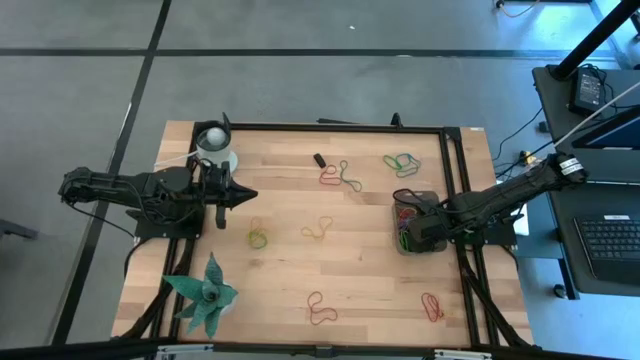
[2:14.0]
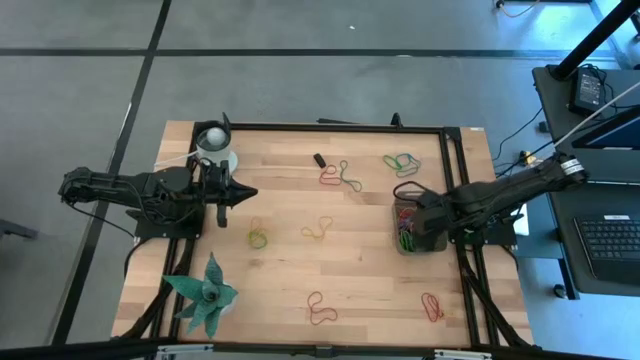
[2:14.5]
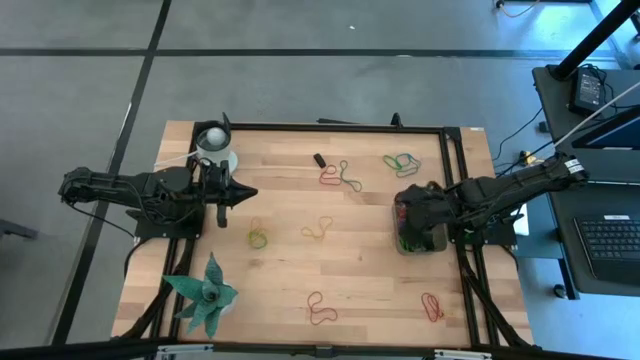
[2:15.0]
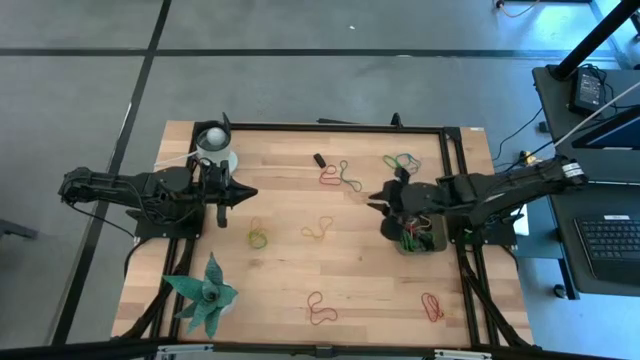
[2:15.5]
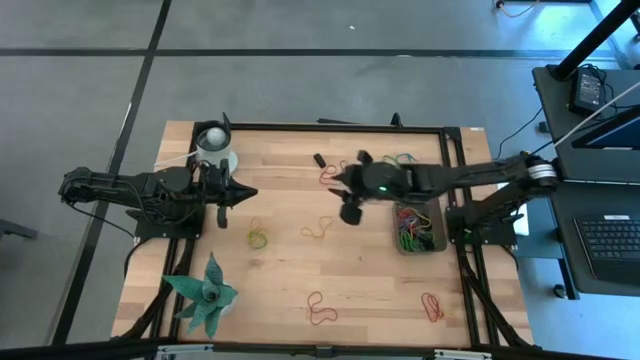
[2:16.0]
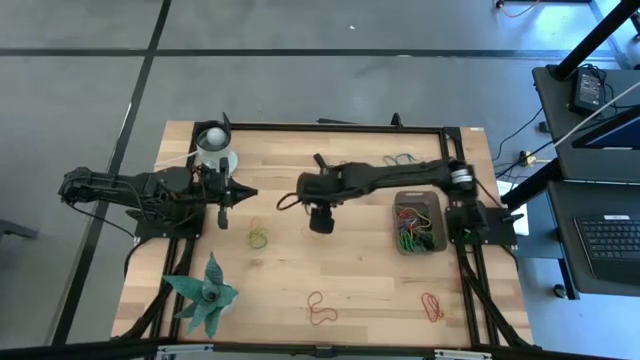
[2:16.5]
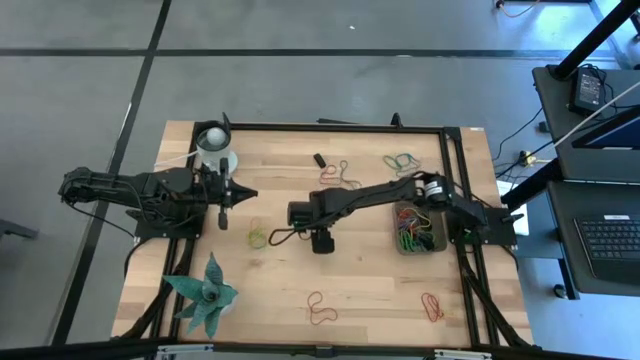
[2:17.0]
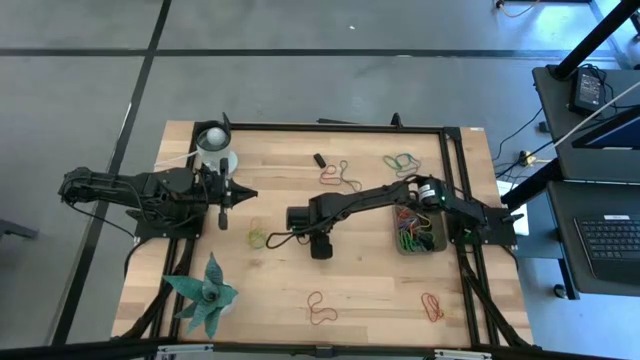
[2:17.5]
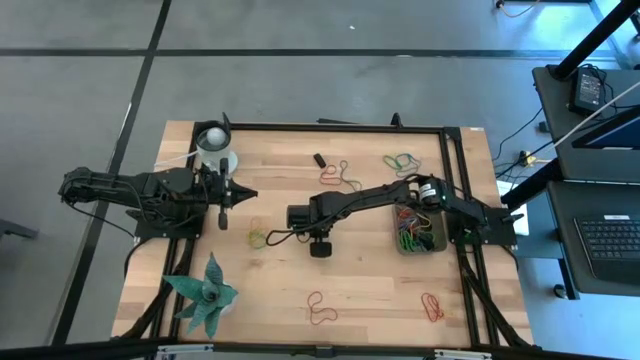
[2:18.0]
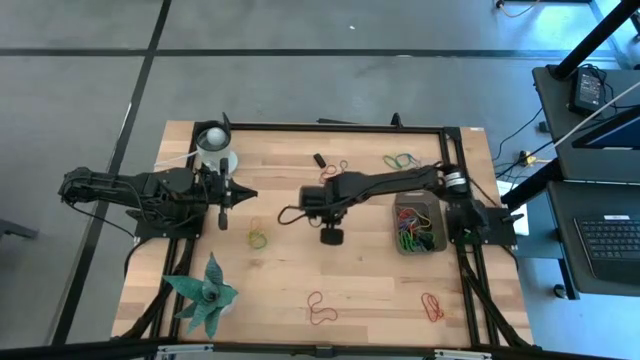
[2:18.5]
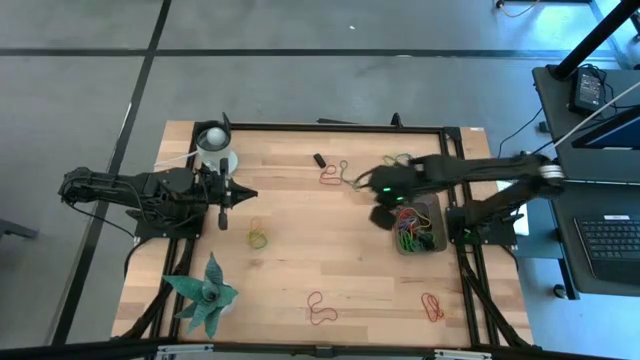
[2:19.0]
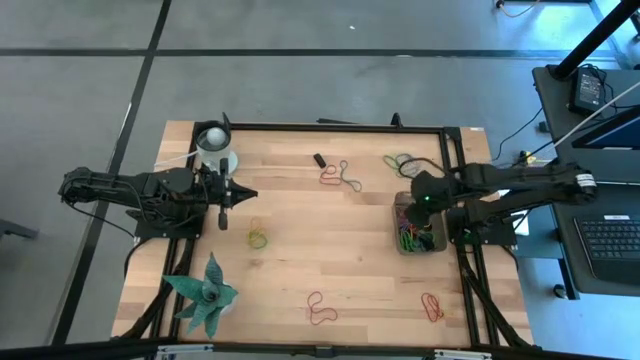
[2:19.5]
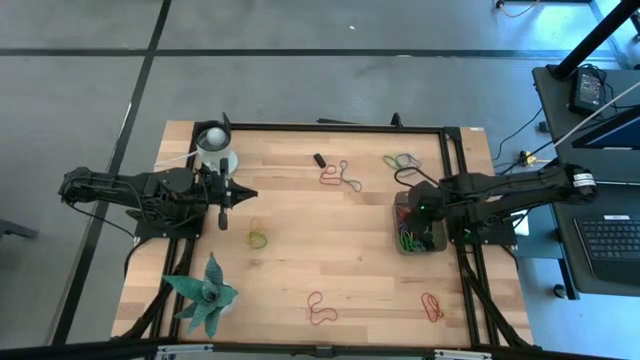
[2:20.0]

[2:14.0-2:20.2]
Task: Pick and place rubber bands into bin
Put the yellow rubber band into the black bin

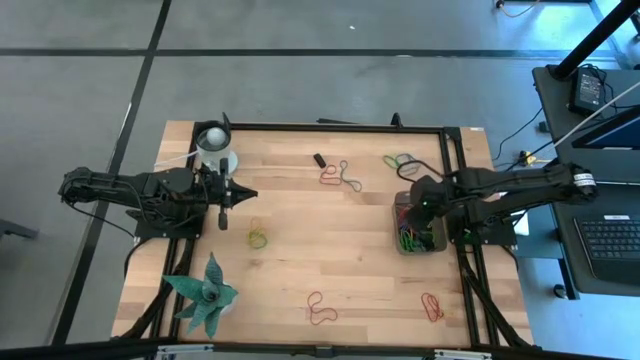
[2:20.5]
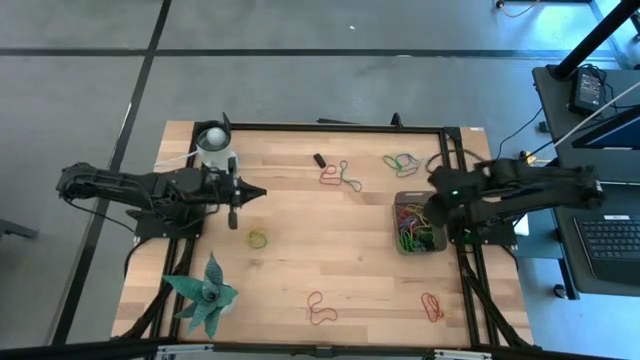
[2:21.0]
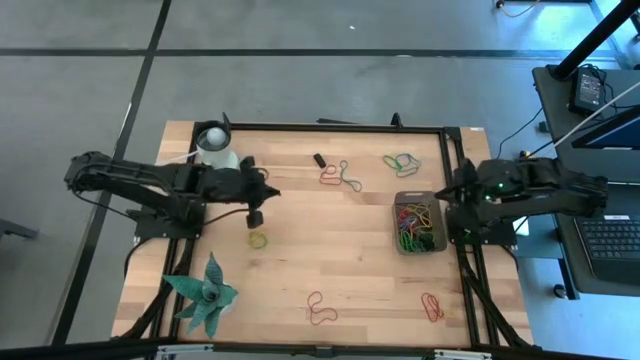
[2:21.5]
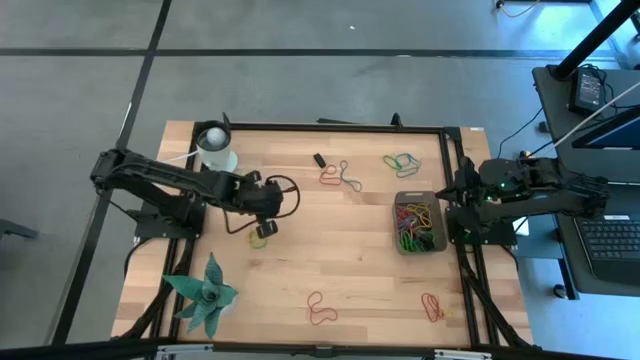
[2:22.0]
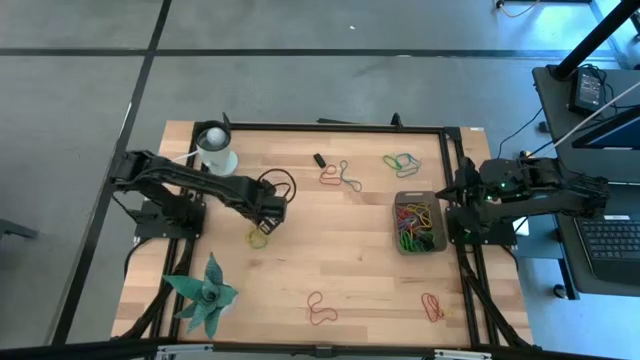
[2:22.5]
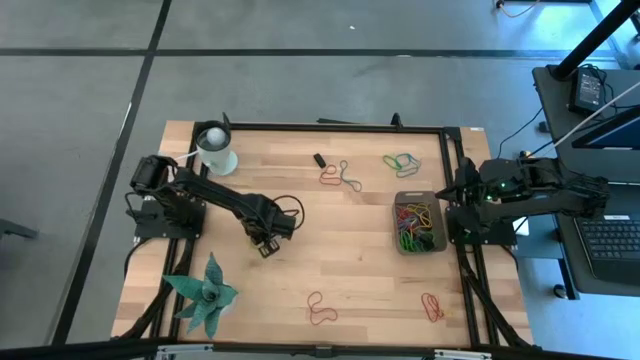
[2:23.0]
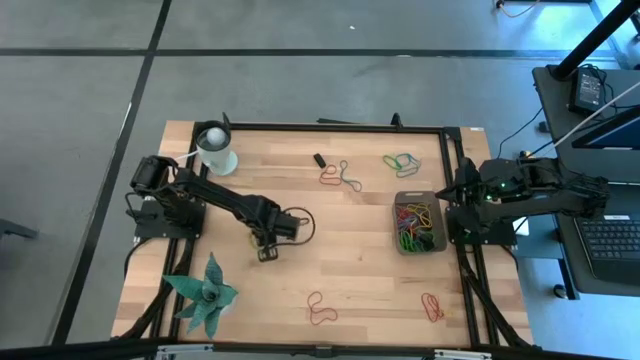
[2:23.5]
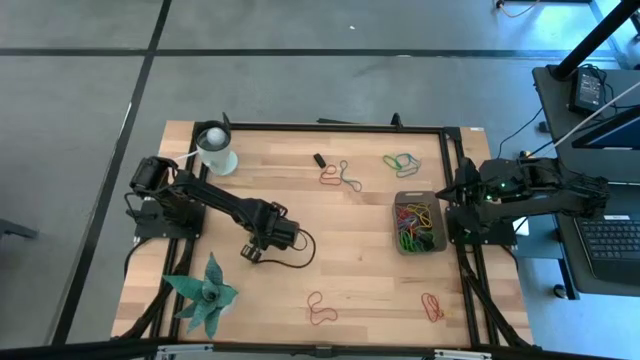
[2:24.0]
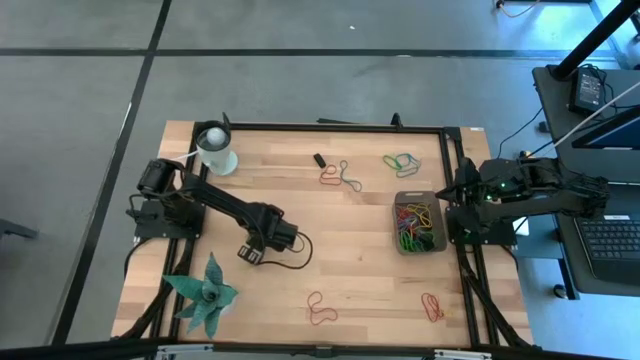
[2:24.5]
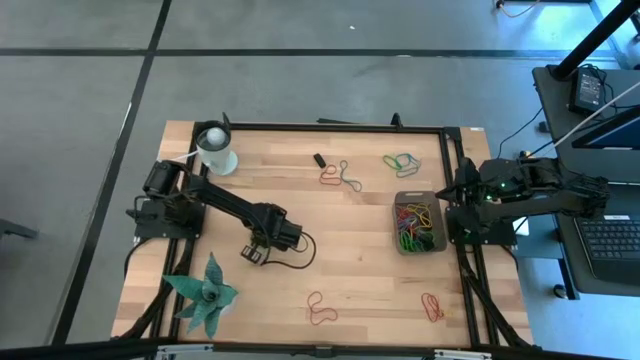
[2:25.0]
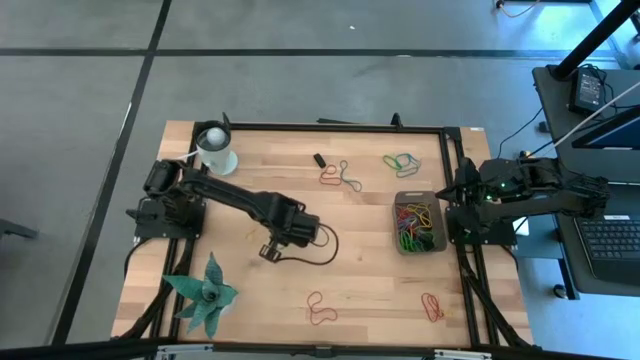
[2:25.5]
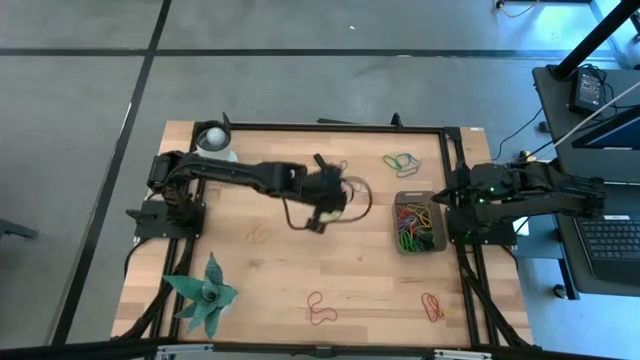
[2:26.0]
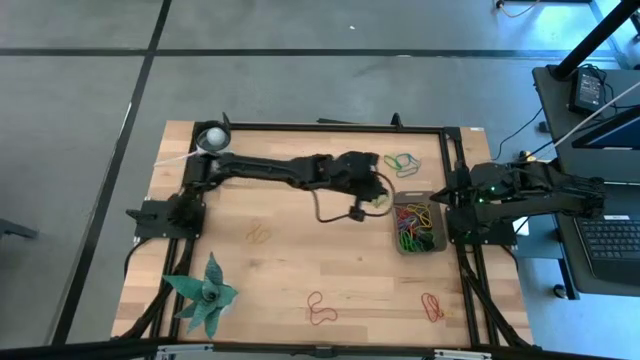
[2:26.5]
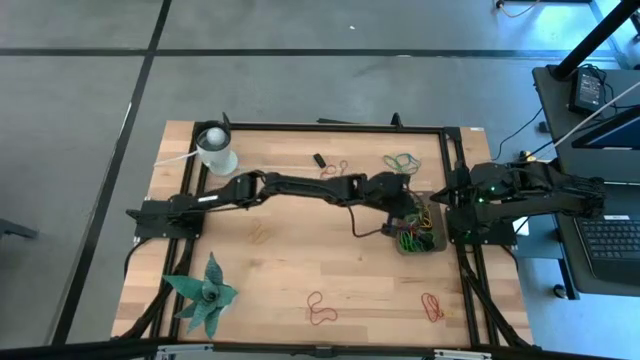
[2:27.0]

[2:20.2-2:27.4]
Put the green rubber band into the black bin

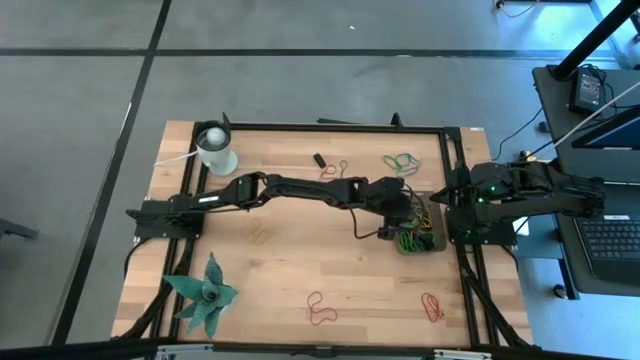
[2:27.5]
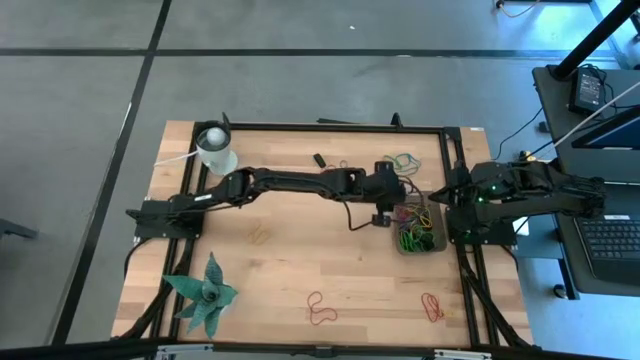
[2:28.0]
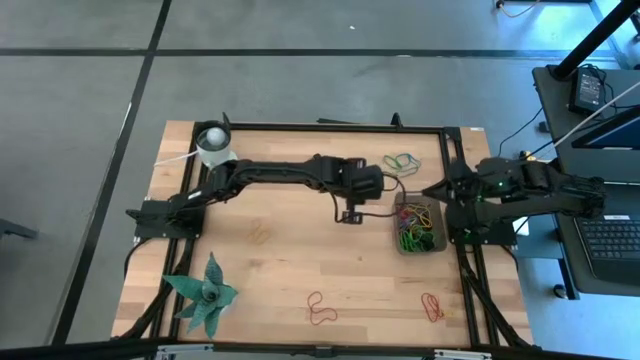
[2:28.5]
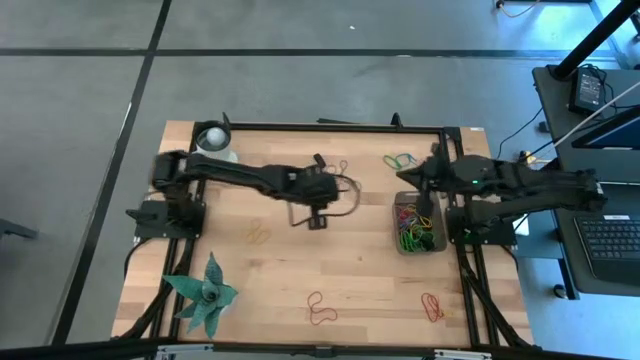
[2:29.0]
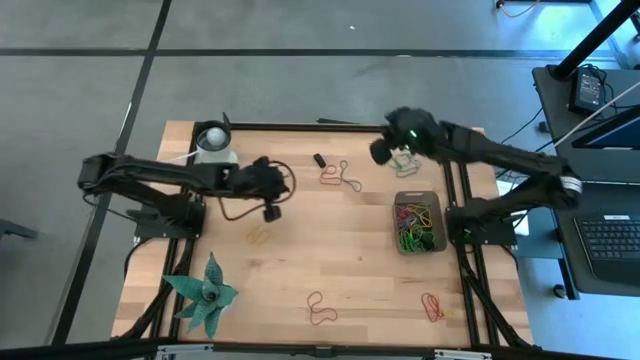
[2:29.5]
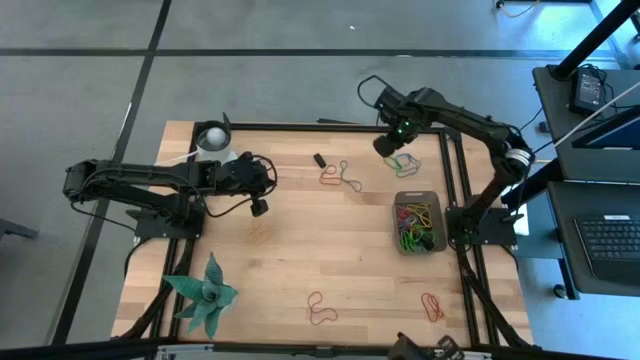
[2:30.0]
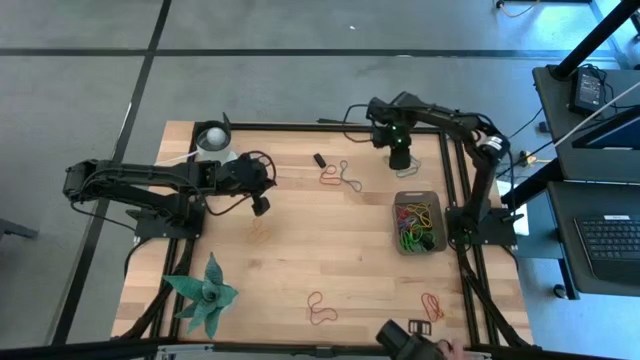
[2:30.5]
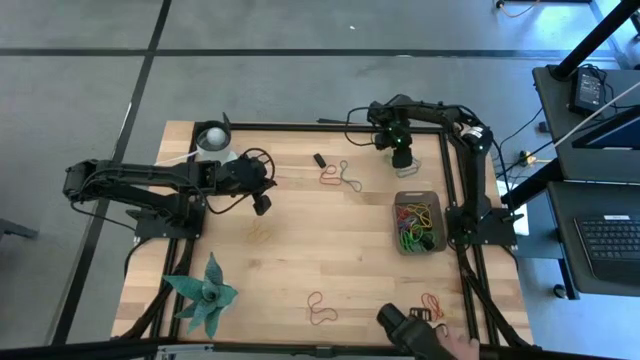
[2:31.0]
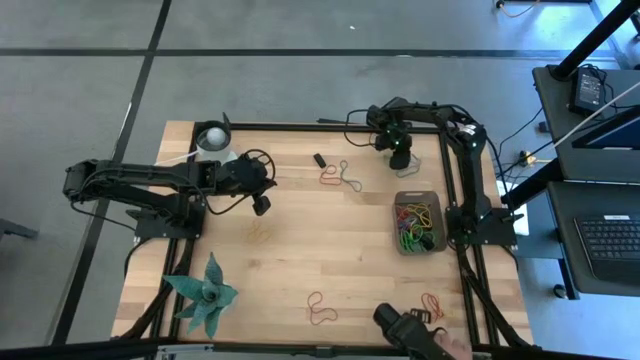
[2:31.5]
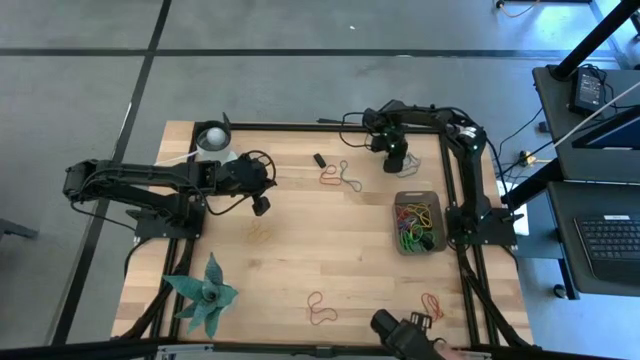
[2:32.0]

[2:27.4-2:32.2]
Put the blue rubber band into the black bin

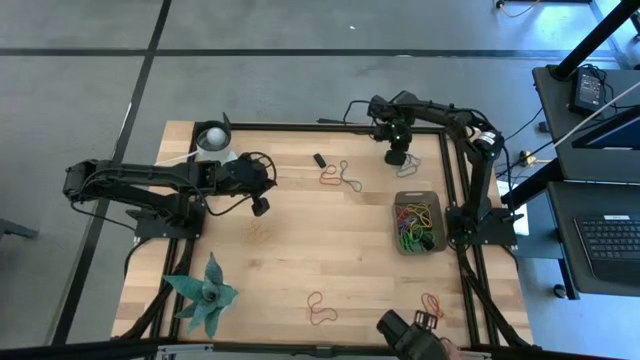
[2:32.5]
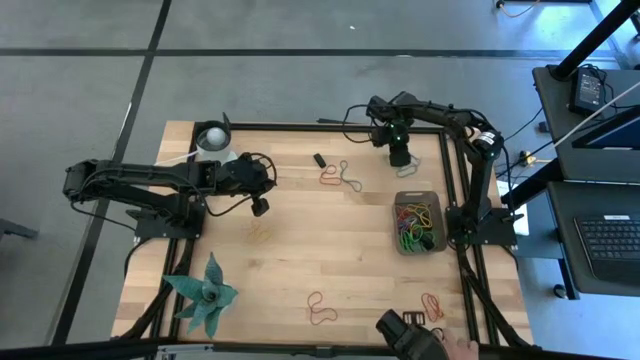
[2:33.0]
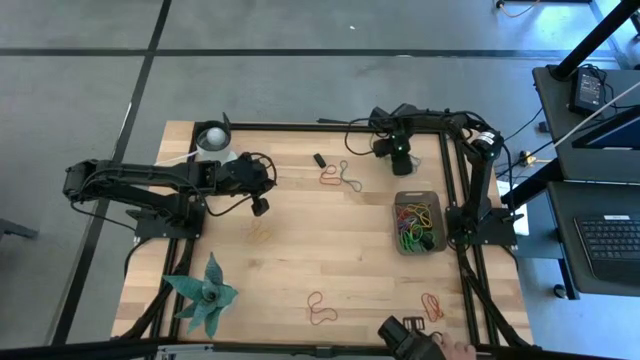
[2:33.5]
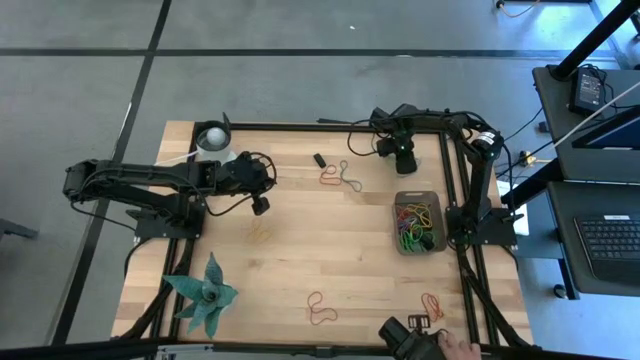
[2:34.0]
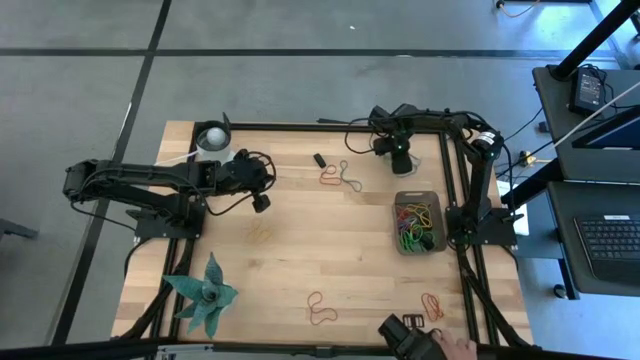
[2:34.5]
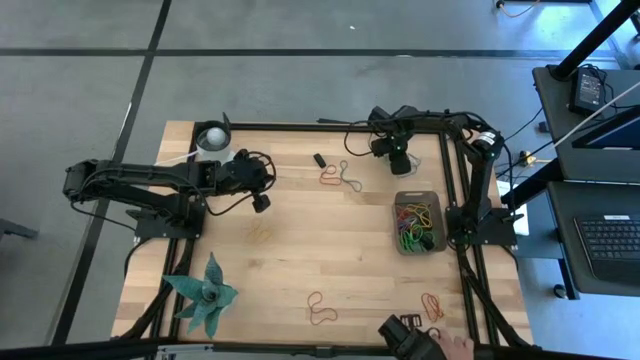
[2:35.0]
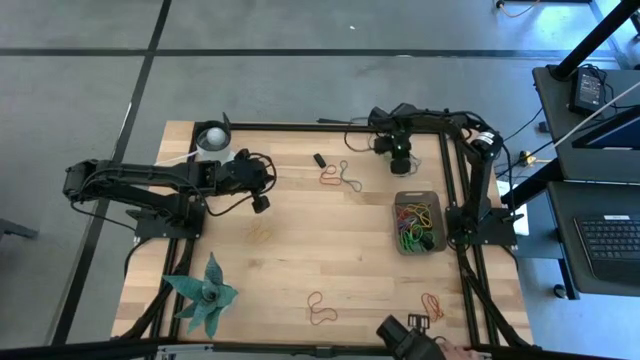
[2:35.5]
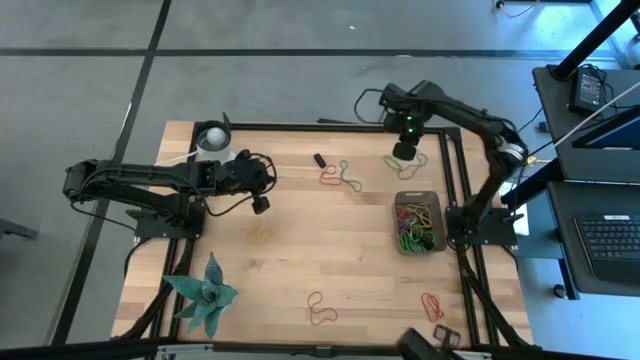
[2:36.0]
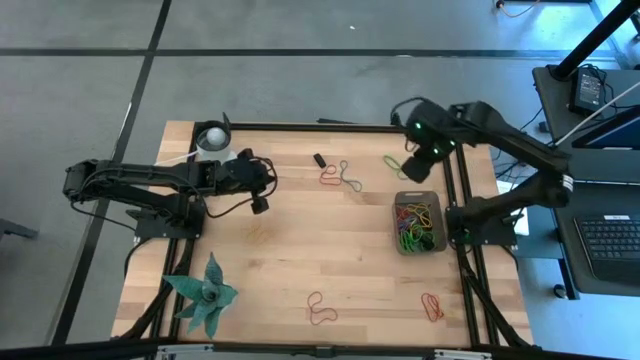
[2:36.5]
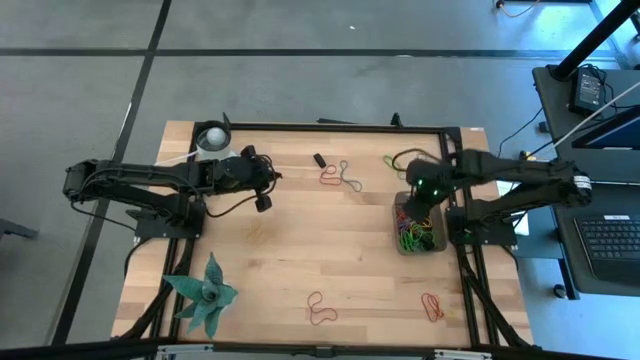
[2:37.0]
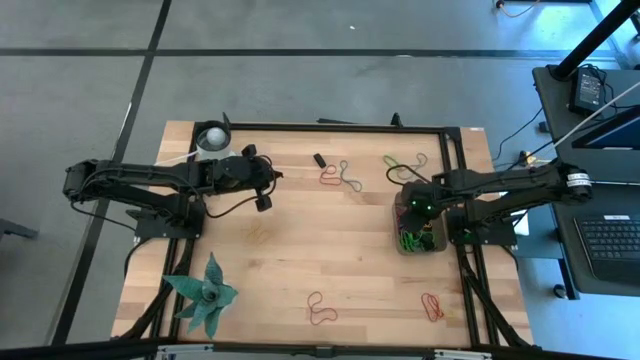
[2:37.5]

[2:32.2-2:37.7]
Put the blue rubber band into the black bin
